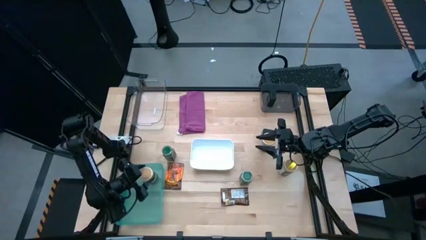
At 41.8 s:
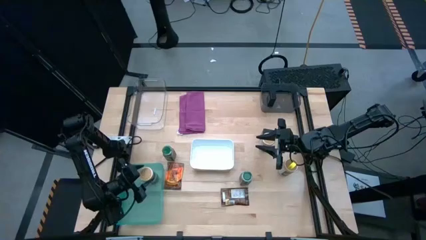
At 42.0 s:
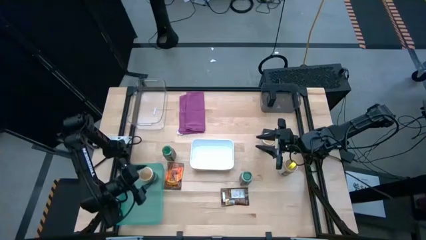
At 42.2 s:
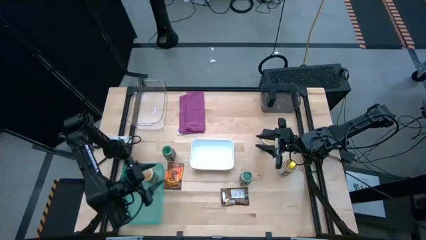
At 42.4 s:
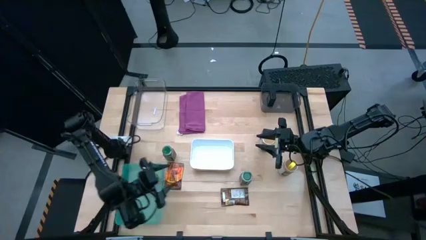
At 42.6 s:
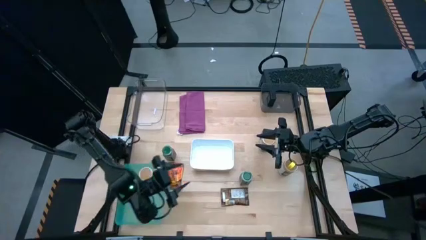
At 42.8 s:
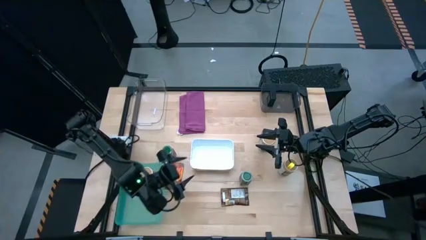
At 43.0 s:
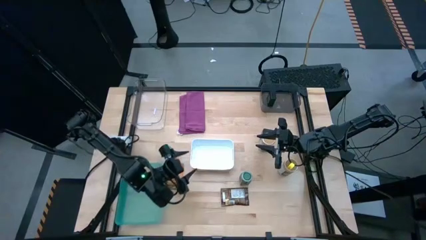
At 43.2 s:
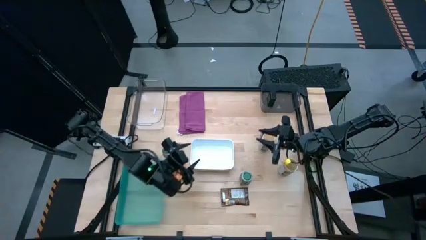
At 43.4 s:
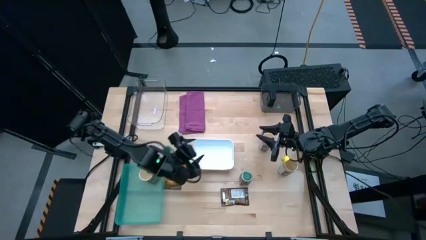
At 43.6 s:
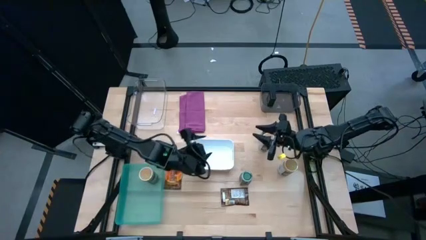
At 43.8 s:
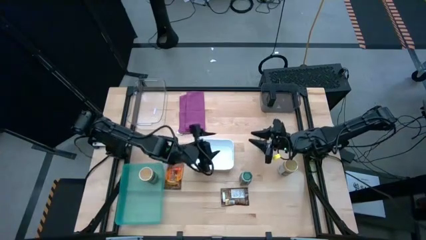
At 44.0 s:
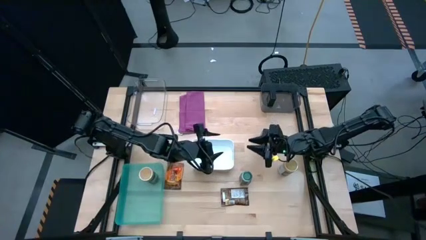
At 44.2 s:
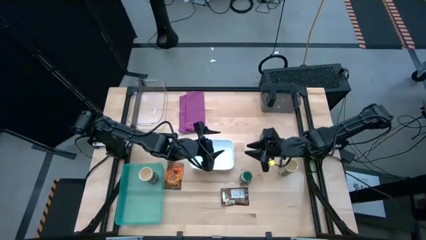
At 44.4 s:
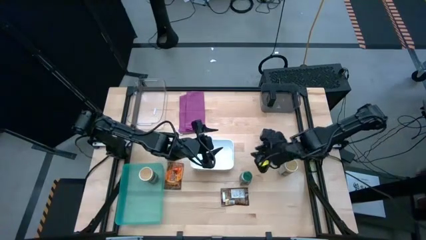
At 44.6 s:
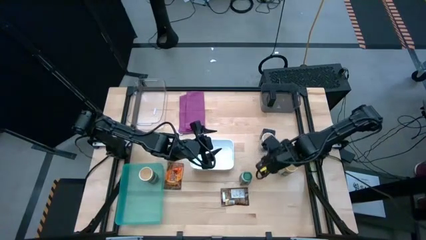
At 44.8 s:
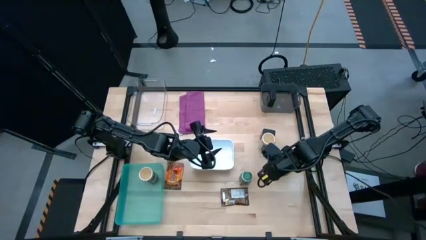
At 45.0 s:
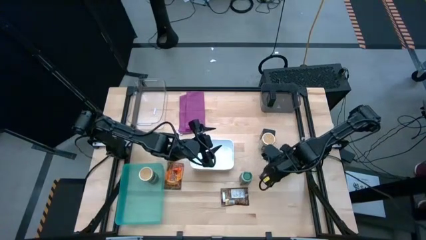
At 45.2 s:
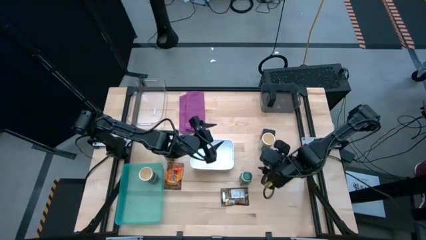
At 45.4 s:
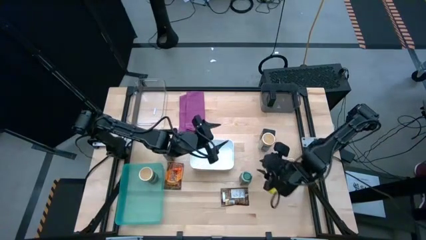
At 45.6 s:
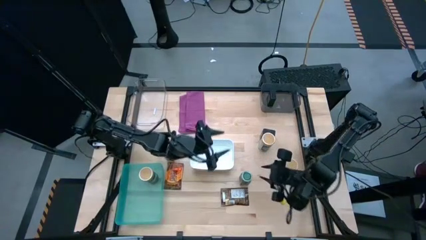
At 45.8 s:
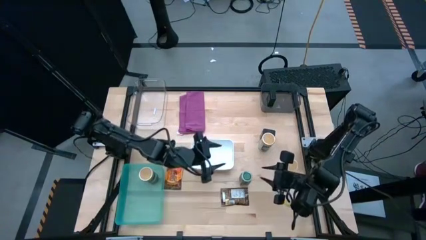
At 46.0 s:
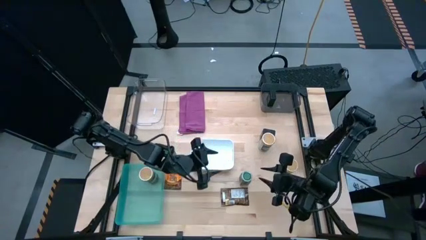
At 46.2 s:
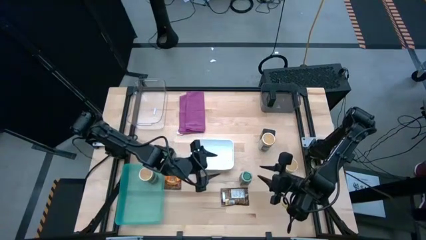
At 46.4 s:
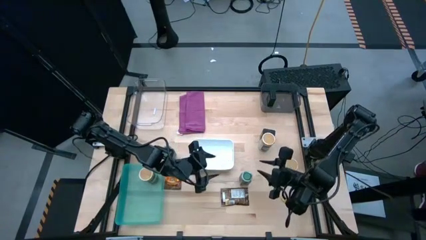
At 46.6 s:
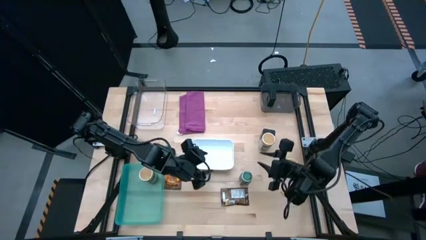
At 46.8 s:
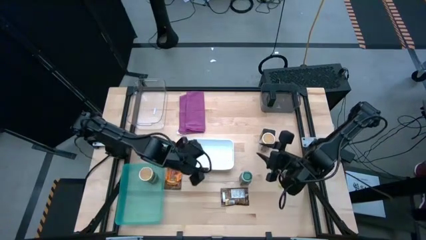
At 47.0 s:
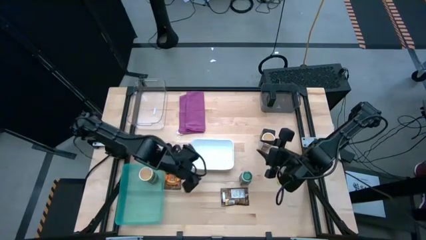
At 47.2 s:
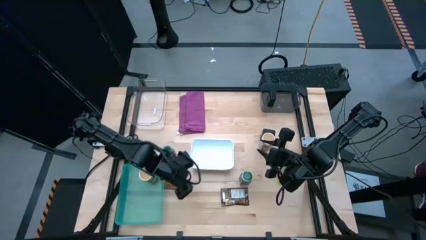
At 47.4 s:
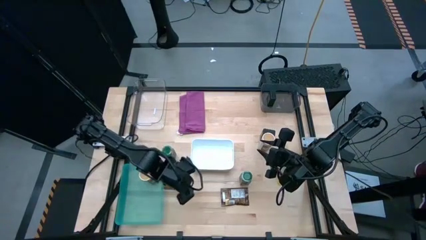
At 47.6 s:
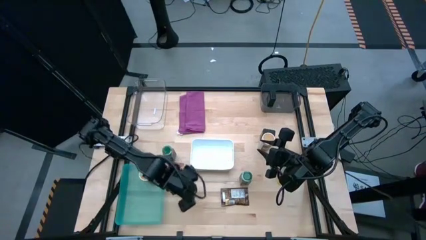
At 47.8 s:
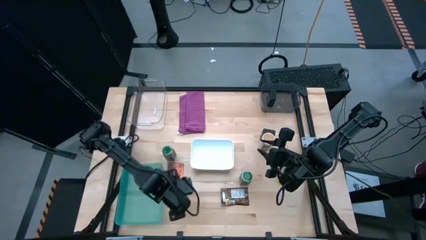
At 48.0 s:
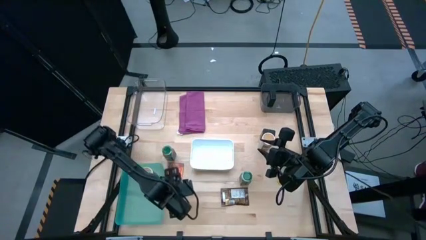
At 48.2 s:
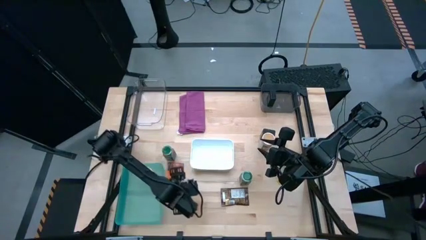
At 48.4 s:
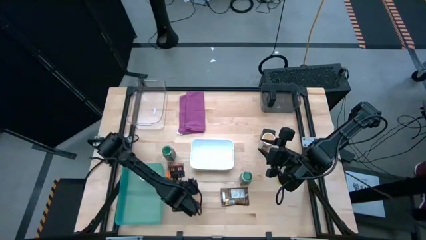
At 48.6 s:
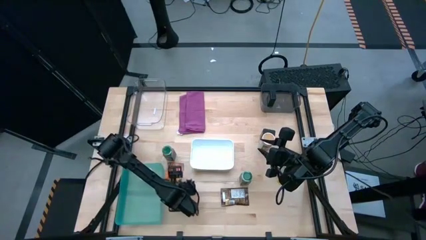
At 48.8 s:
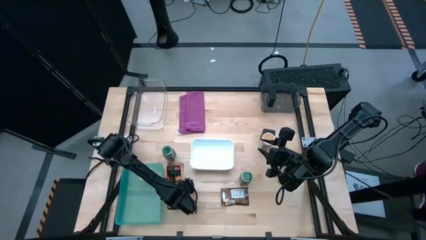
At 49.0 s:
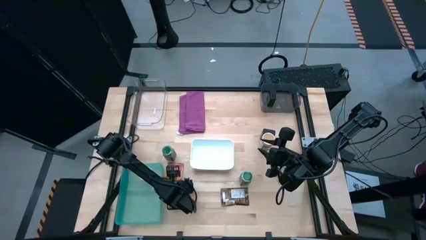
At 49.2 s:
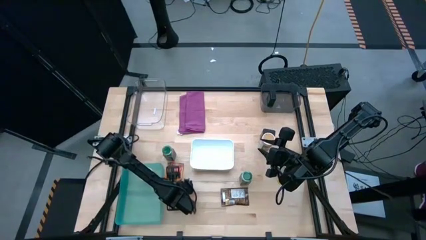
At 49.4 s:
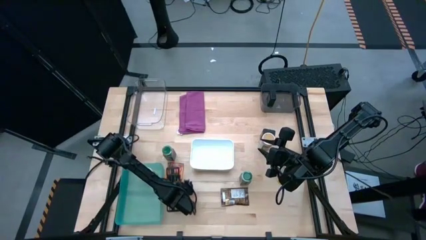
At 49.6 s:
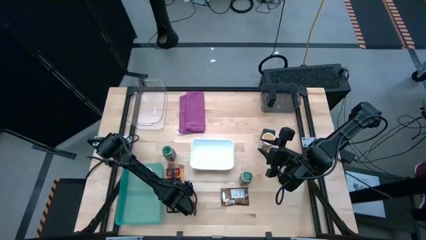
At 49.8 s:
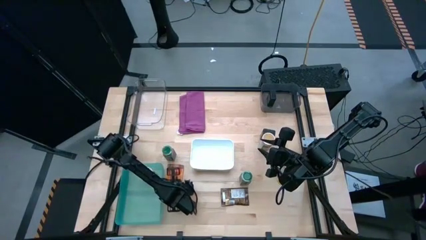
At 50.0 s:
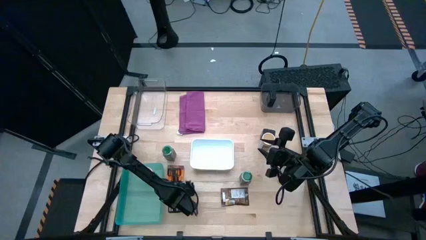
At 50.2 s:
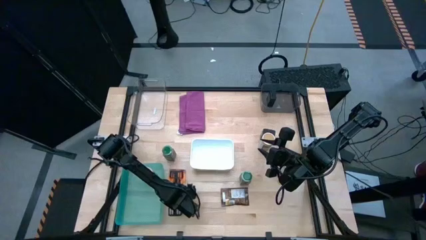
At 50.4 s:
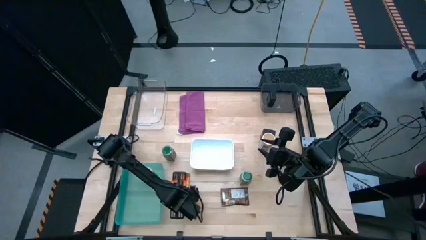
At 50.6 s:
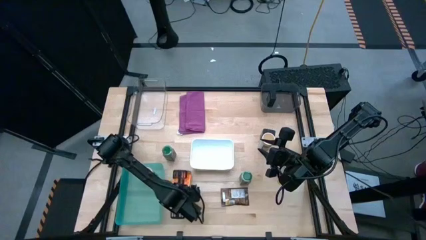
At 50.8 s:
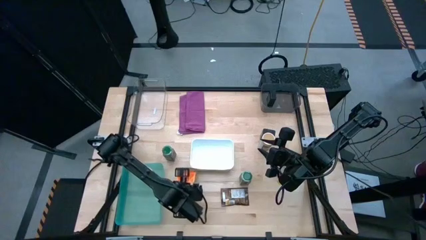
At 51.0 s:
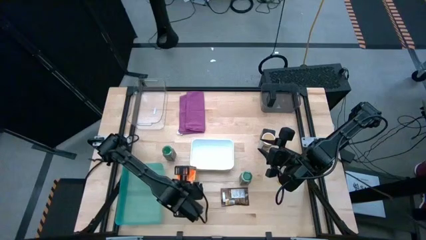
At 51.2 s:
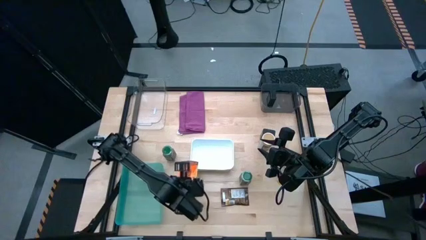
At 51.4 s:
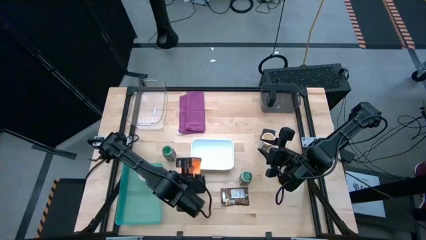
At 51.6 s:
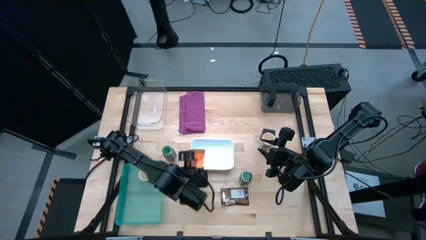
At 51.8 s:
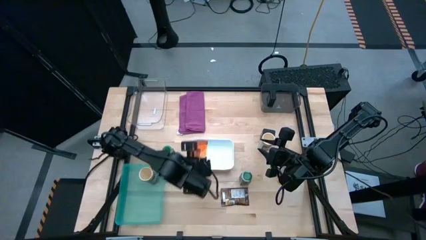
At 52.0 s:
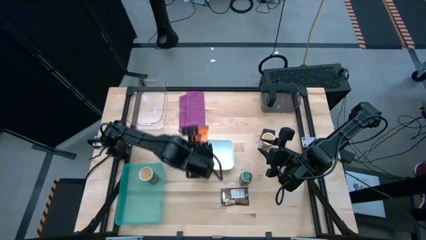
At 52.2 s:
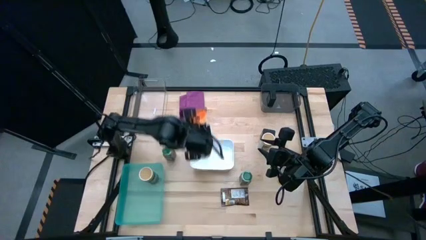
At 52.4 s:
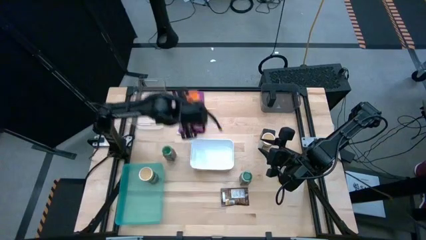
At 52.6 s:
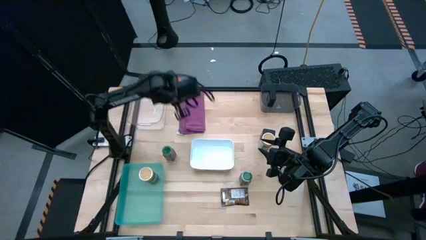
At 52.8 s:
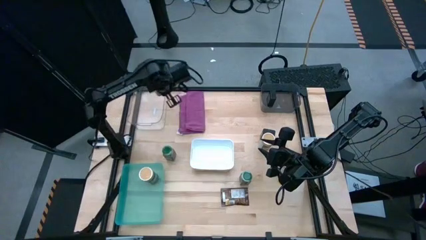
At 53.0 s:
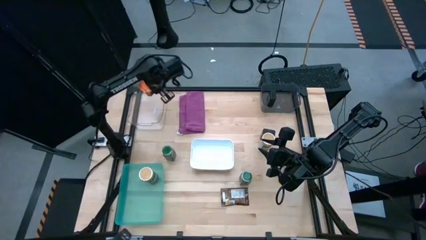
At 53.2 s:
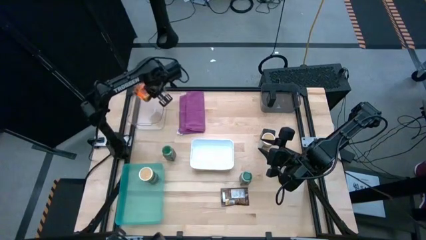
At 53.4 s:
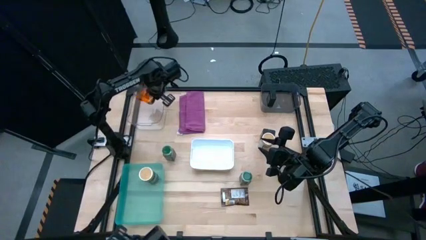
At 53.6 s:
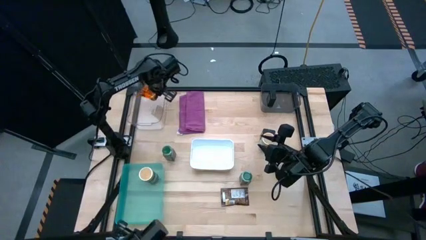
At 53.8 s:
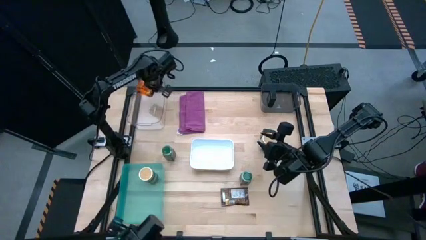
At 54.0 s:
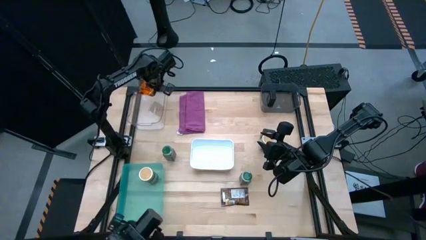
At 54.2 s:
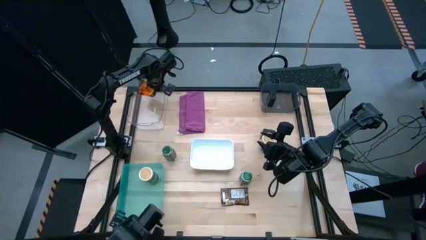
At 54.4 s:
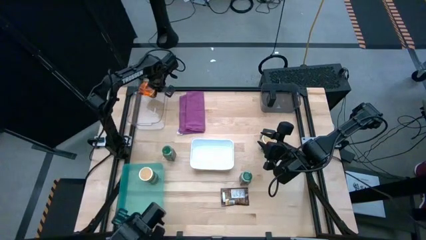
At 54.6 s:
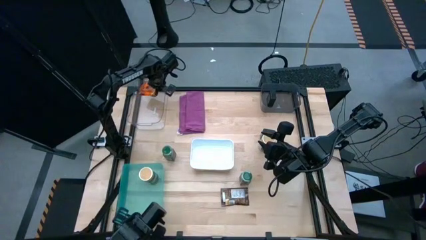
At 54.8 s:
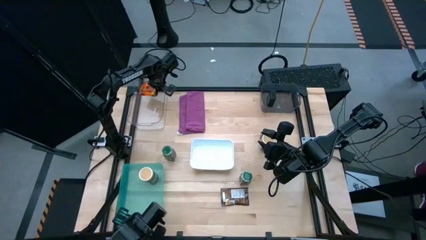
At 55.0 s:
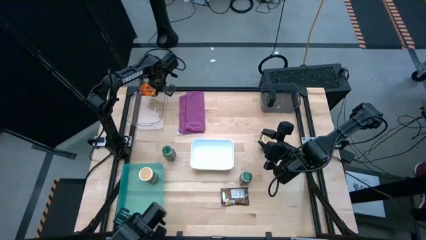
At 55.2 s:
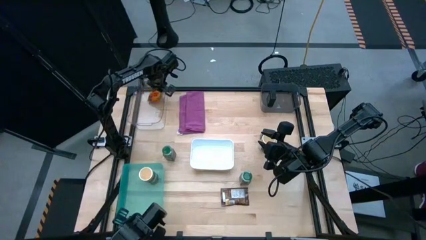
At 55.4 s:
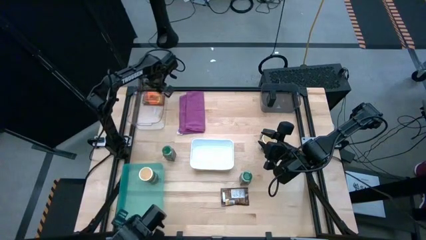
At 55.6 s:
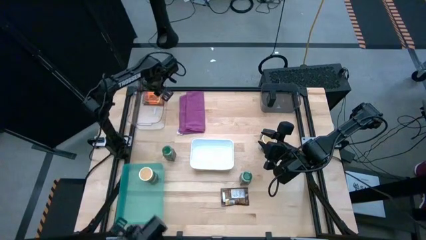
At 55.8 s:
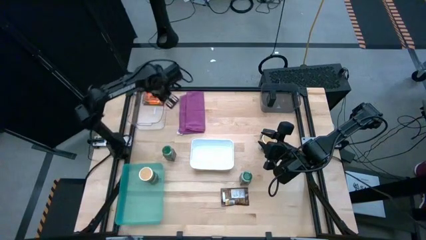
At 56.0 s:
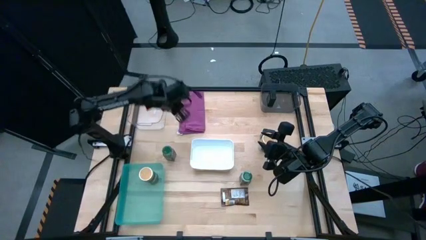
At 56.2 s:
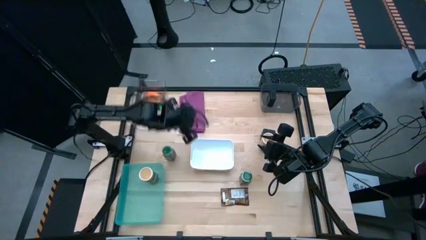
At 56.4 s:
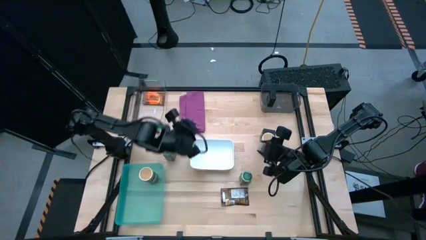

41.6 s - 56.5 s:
Task: Sort spices by type
Put the left orange seasoning bag into the transparent bin

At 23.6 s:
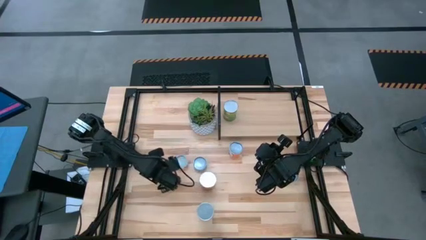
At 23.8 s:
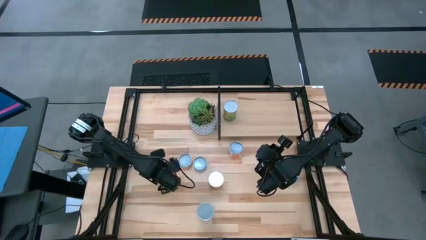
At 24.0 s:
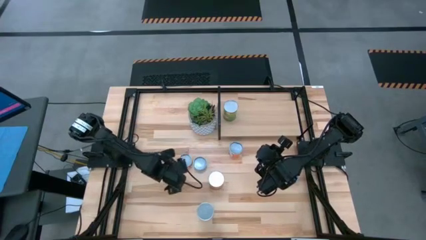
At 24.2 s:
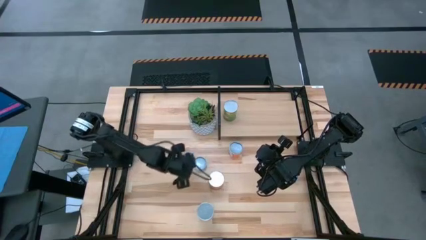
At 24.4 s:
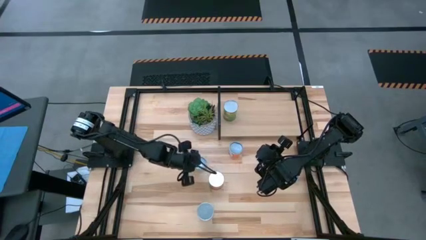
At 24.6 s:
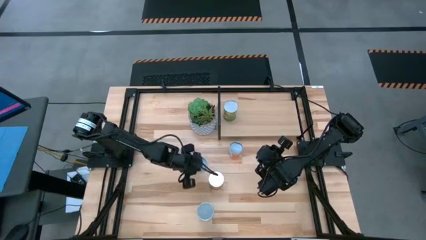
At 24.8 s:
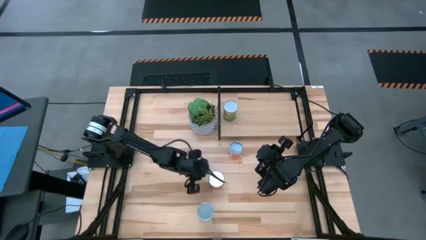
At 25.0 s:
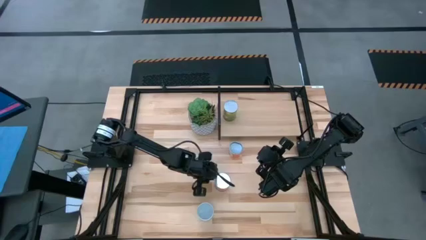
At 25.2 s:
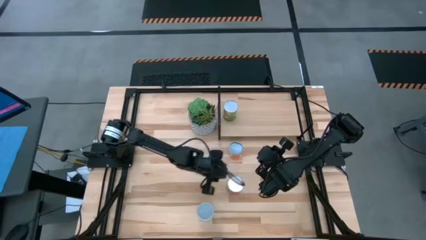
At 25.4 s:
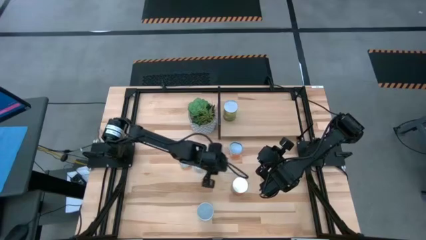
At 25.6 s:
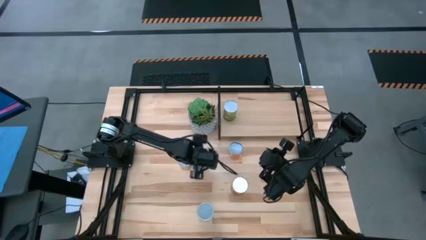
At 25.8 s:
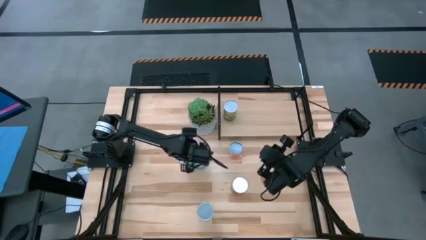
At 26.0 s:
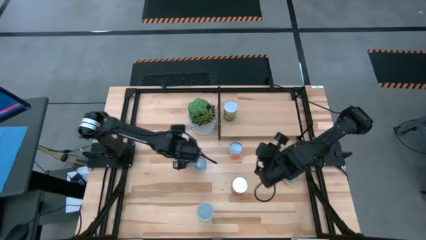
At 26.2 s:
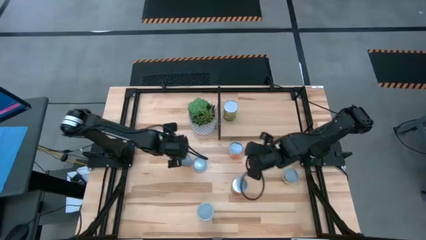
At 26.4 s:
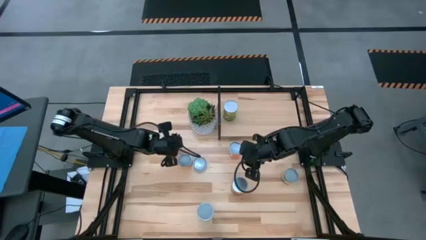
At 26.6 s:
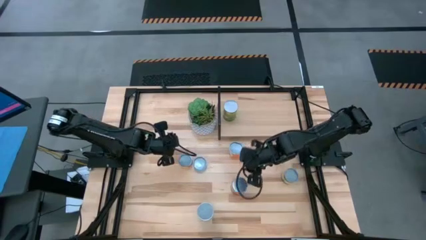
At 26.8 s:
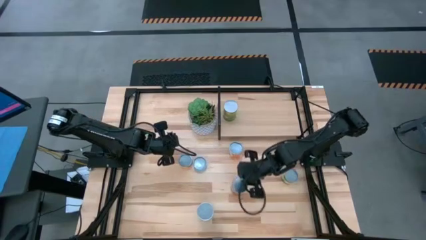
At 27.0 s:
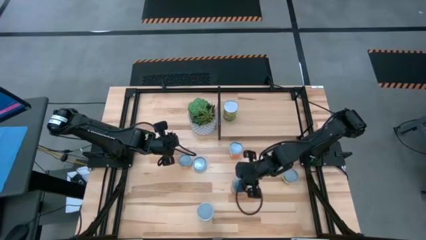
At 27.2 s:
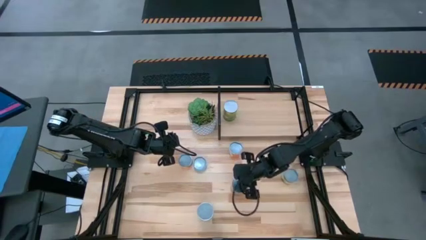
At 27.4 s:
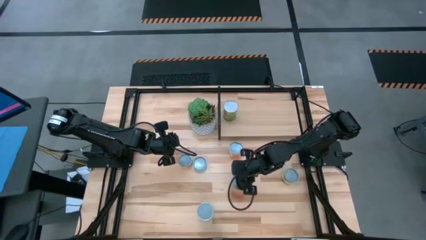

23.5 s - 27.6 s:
Task: Pick and place cans onto a shelf
Put the canned green peas on the shelf
